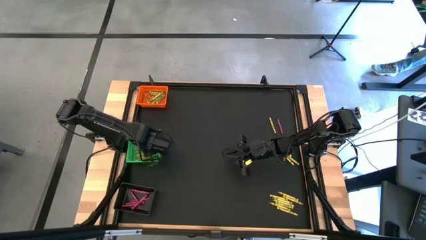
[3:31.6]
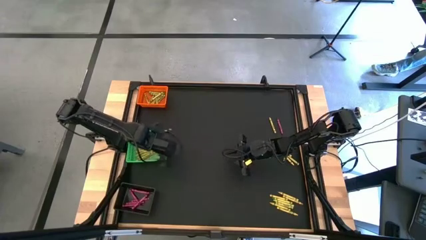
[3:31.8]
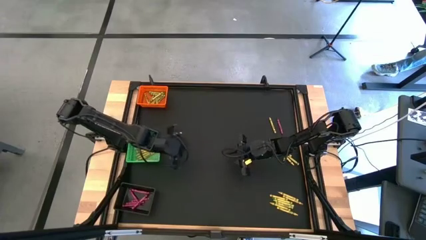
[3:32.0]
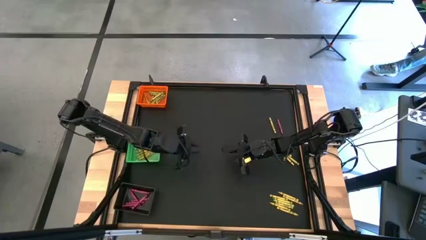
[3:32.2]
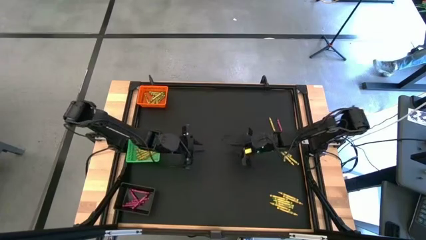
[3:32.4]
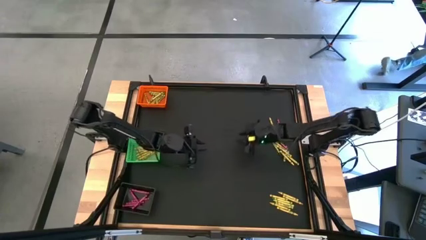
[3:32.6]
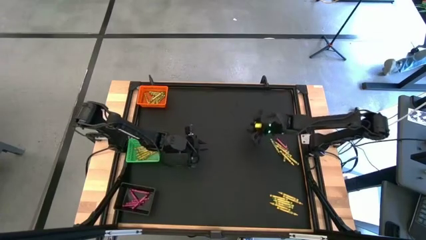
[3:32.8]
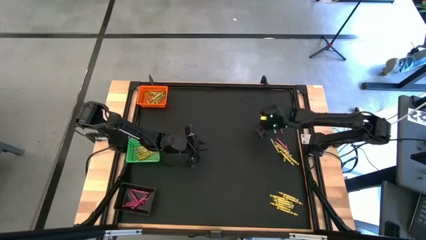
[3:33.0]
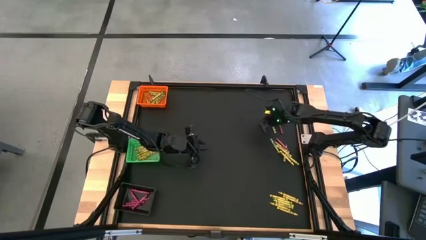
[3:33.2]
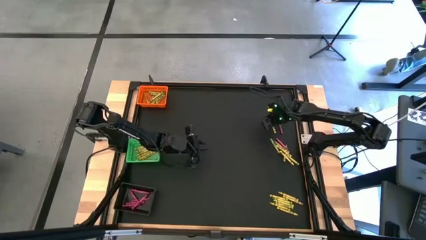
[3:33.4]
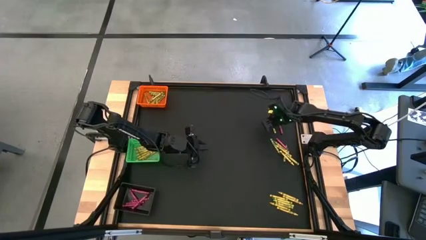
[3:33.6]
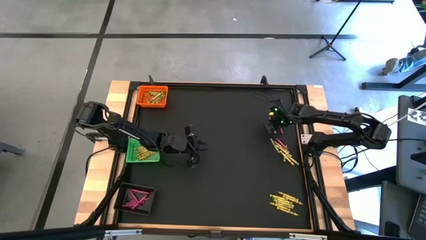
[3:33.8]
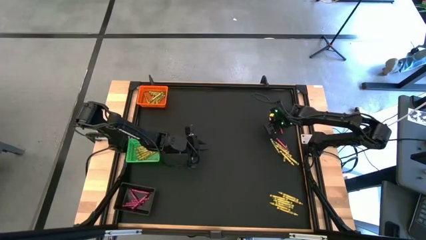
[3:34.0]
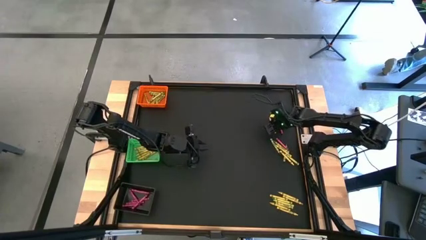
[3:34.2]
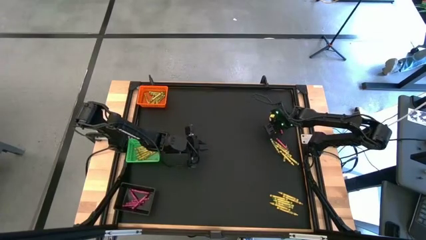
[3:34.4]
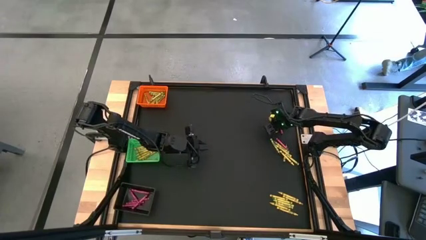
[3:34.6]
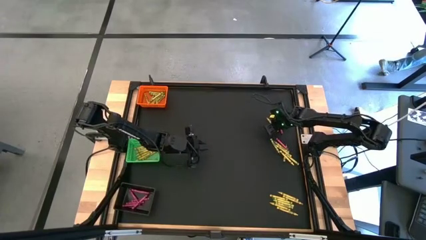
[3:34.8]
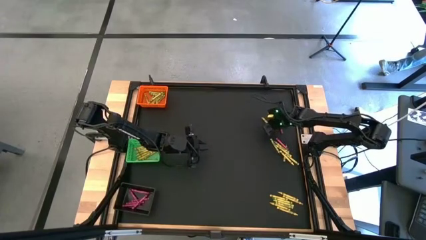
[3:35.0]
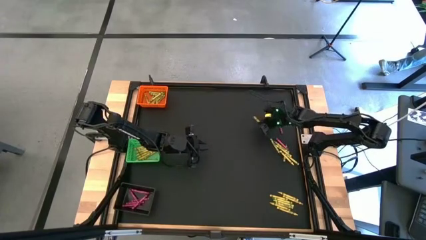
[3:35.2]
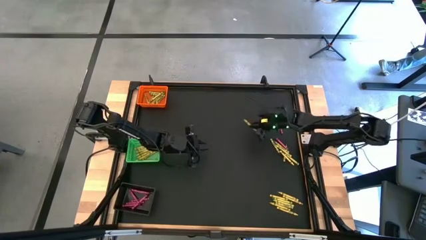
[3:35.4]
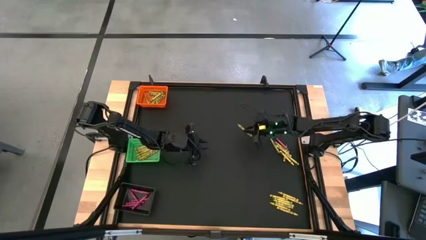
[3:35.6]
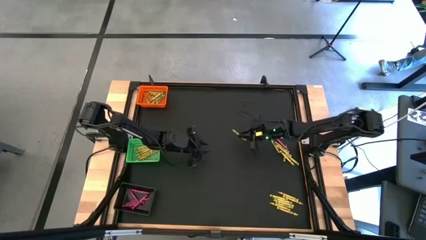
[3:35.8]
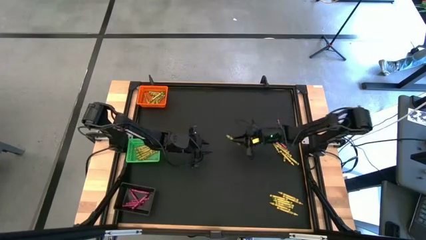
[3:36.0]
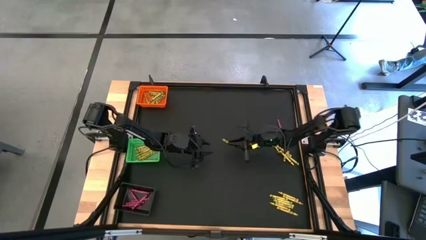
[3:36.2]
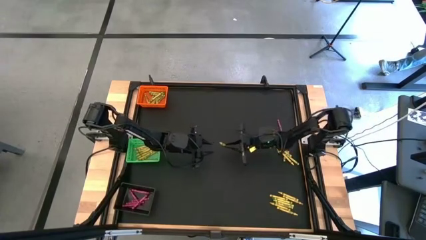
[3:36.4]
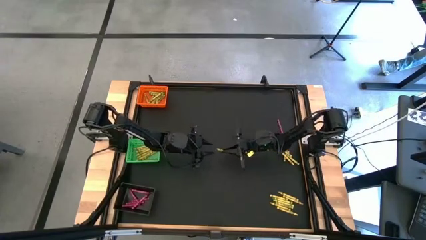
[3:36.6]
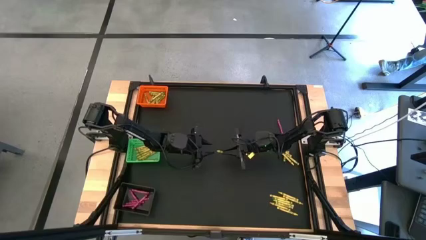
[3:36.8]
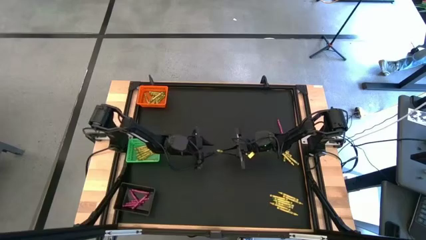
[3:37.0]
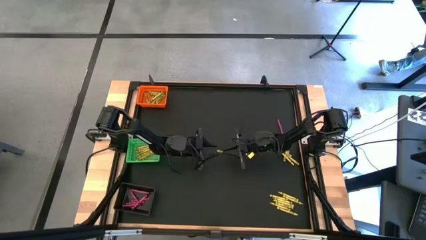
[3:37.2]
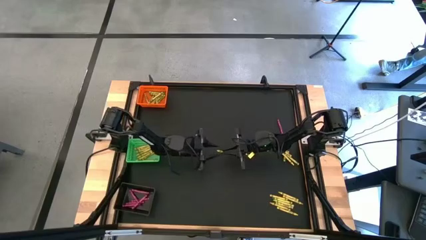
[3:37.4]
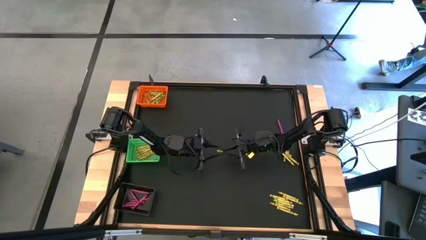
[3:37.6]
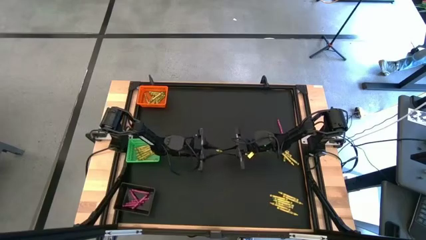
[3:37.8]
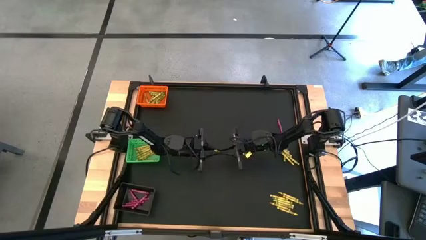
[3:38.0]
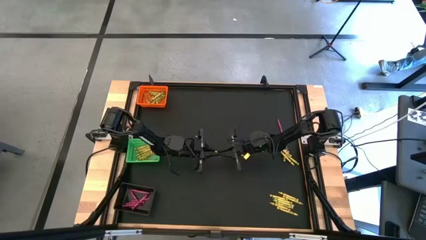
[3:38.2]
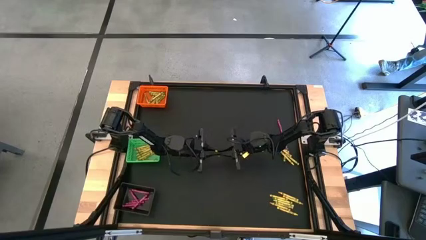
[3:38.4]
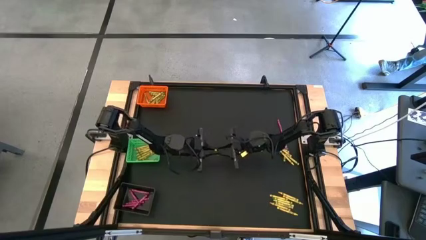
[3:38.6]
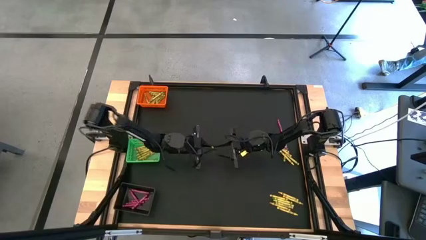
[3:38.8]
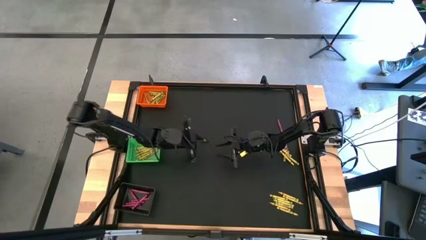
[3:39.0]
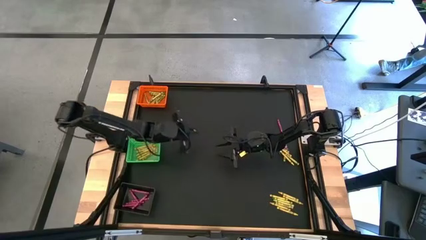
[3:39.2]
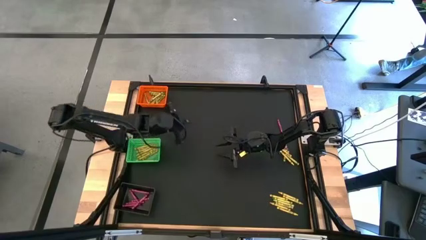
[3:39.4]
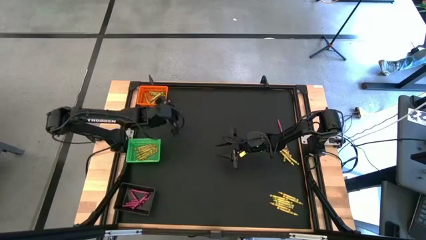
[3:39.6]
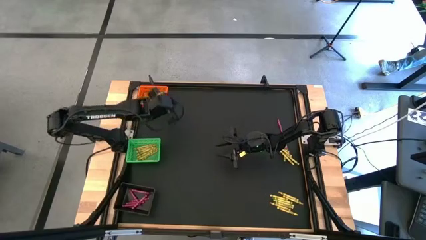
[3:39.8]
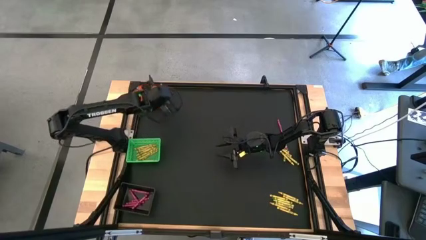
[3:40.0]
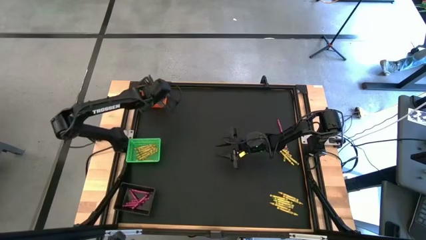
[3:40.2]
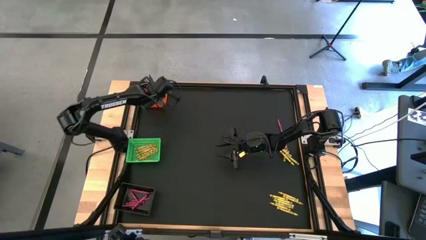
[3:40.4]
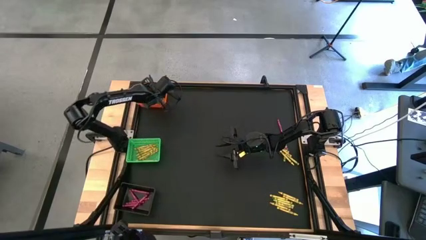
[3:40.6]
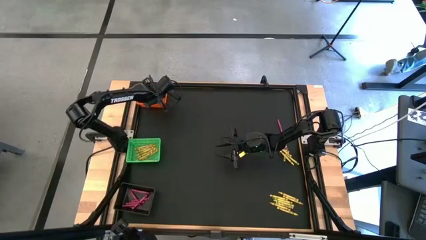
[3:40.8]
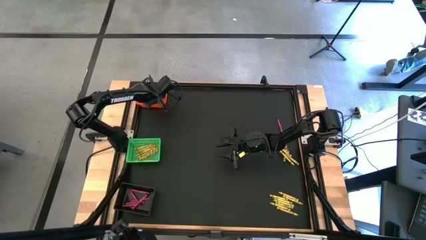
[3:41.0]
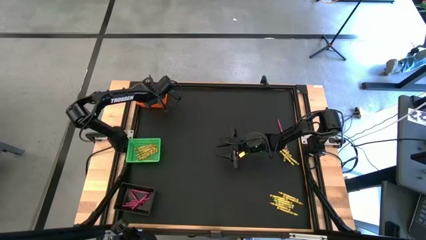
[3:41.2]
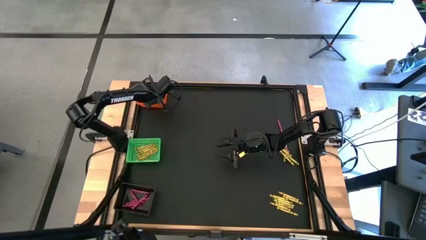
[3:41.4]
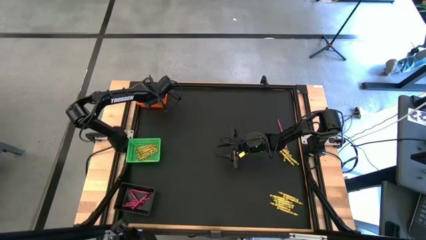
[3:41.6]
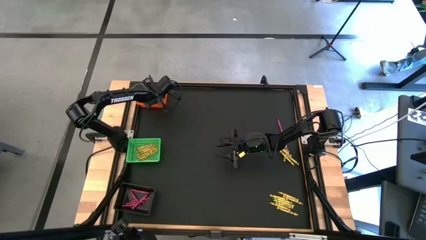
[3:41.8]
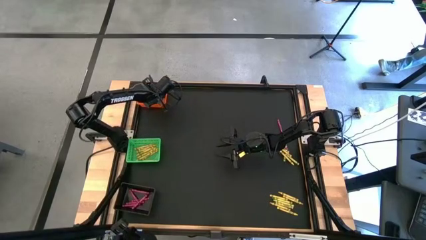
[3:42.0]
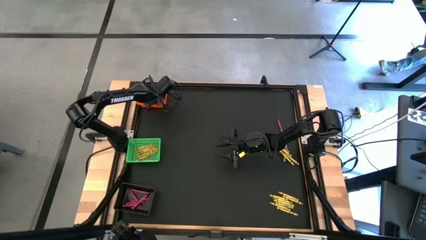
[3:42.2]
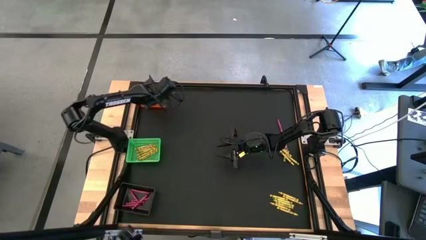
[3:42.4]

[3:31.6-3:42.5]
Task: Sort crayons
Put the yellow crayon into the green bin

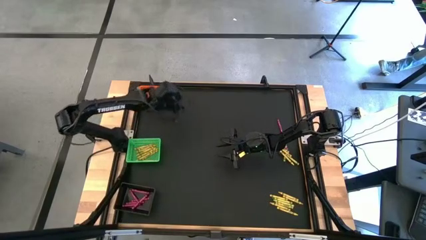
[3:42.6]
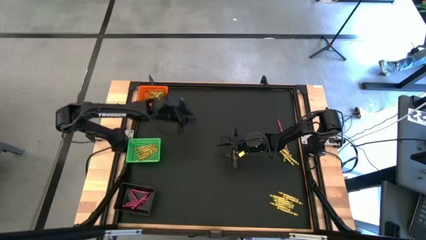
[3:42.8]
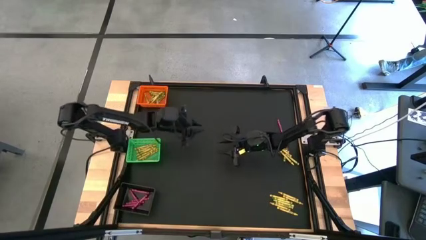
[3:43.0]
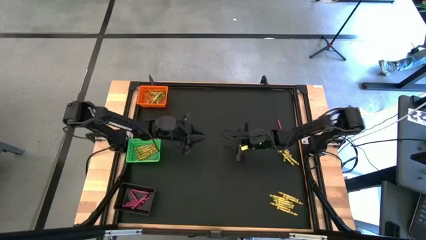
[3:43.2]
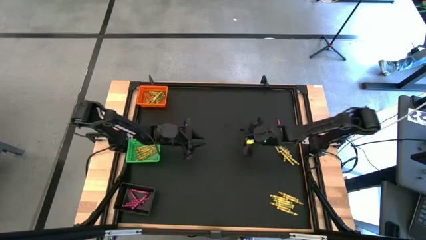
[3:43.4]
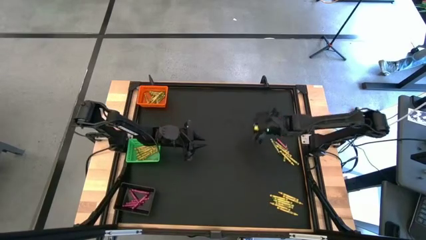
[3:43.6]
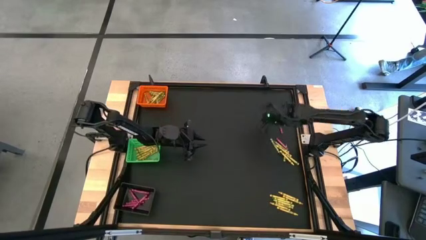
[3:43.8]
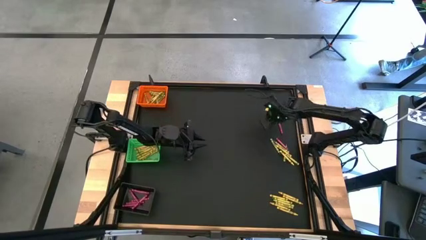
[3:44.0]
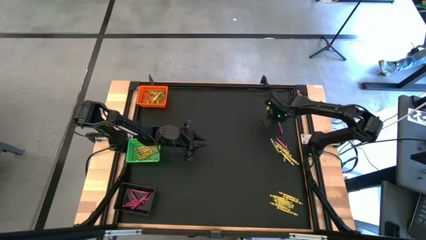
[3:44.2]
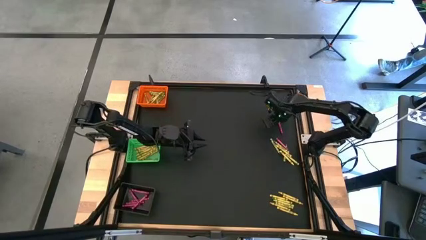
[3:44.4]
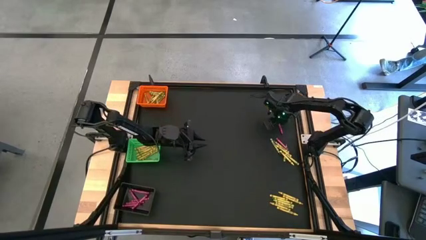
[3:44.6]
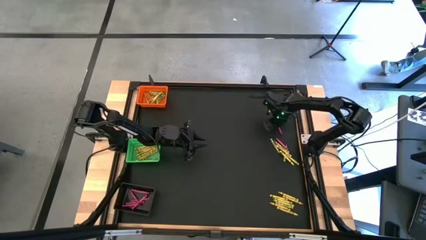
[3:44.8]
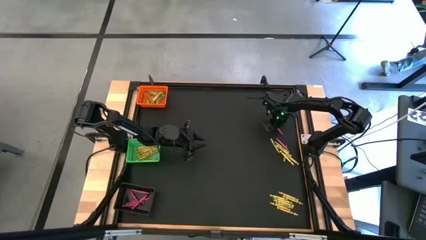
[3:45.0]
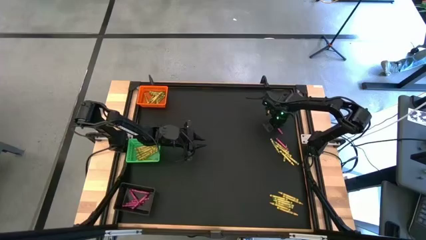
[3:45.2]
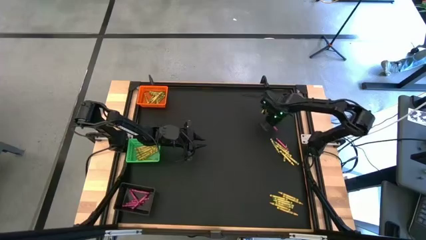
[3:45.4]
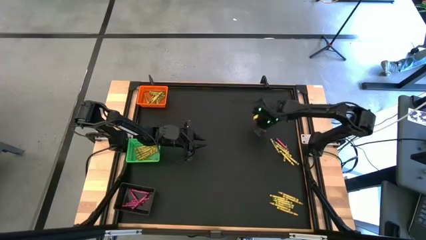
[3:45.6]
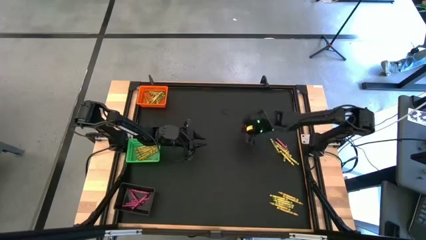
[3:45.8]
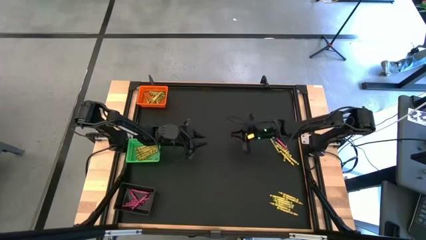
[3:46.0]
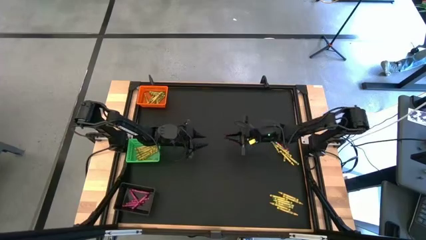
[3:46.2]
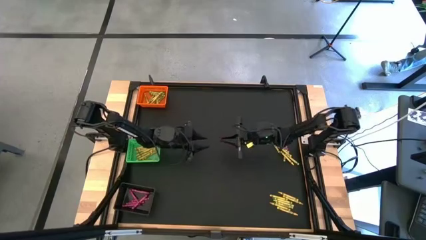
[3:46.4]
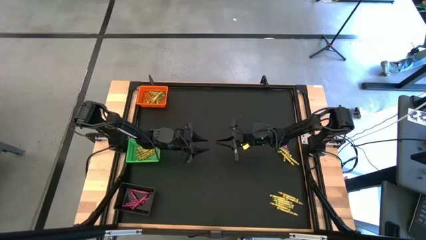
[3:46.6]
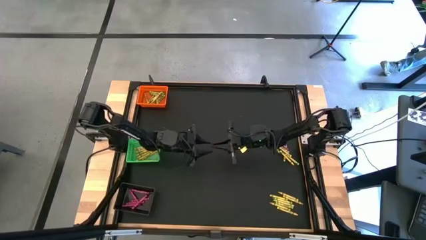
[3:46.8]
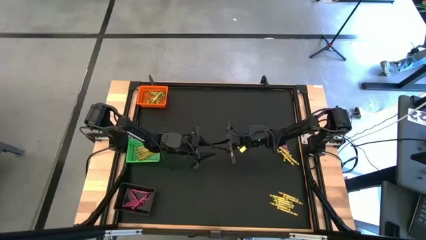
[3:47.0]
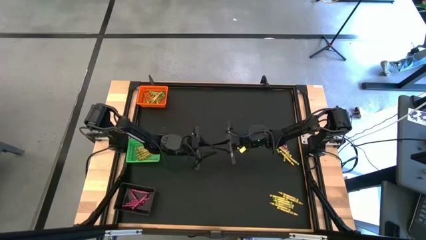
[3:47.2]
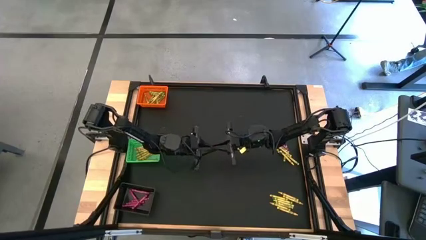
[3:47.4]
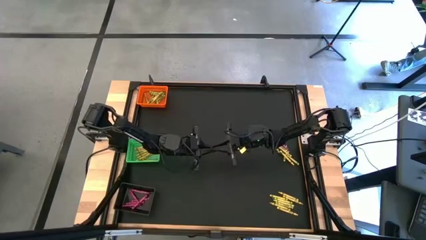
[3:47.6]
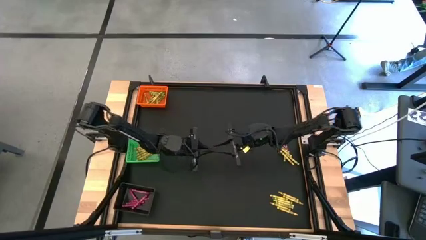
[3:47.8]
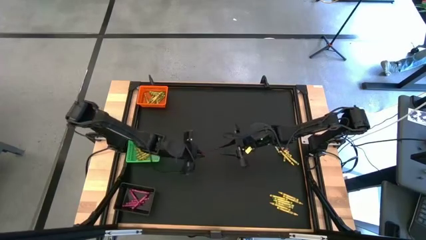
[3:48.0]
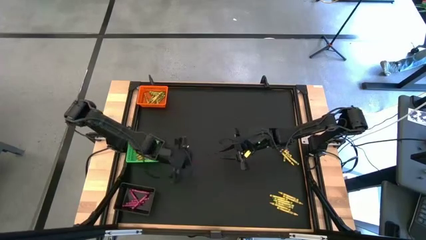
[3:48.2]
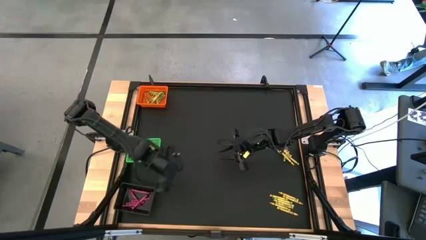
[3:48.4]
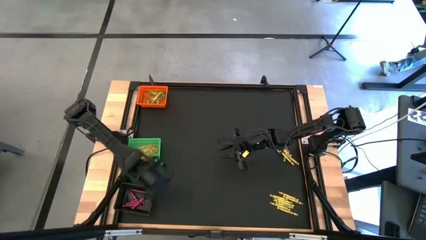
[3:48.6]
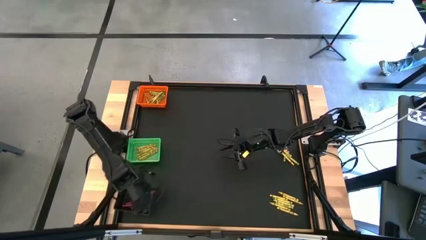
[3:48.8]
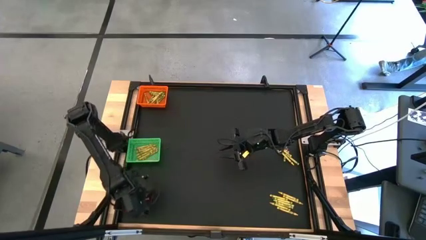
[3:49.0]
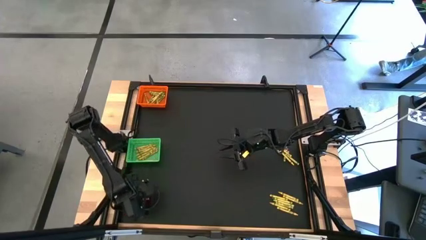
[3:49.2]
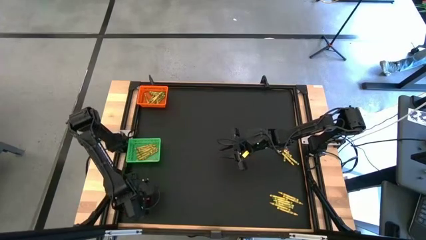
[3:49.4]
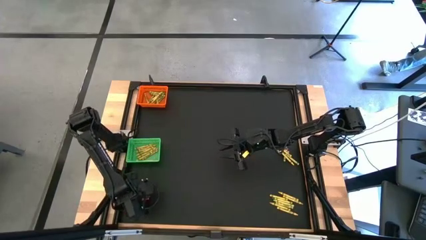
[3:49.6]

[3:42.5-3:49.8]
Put the pink crayon into the black bin
